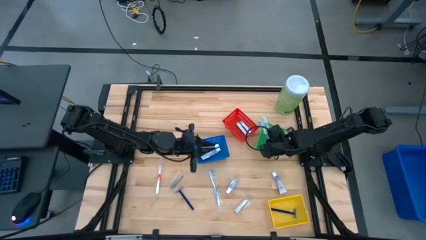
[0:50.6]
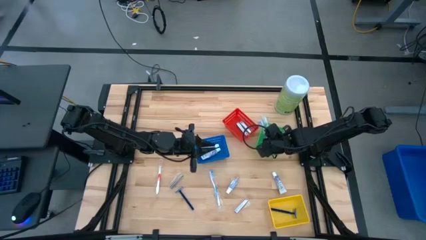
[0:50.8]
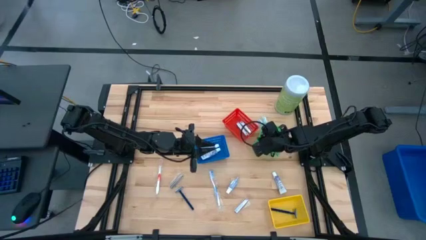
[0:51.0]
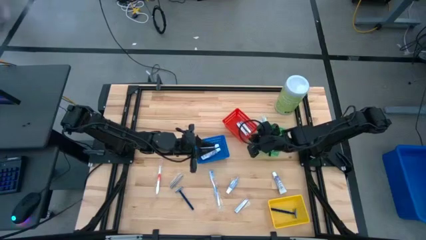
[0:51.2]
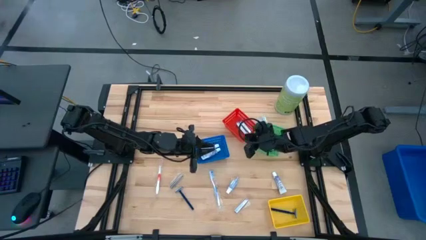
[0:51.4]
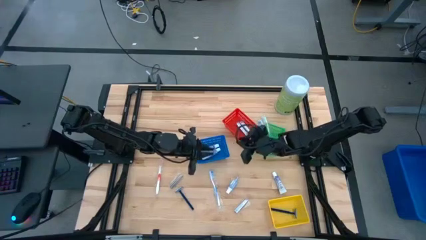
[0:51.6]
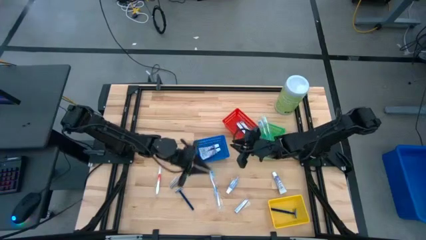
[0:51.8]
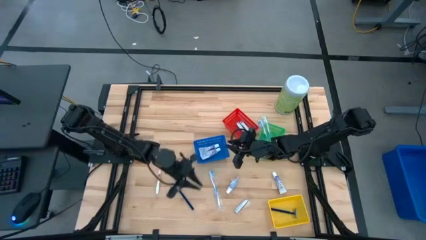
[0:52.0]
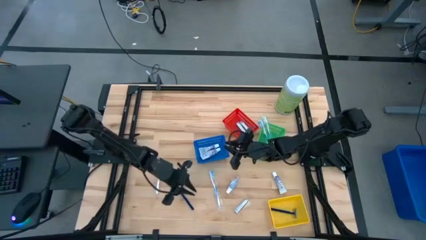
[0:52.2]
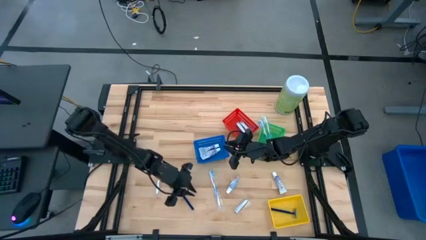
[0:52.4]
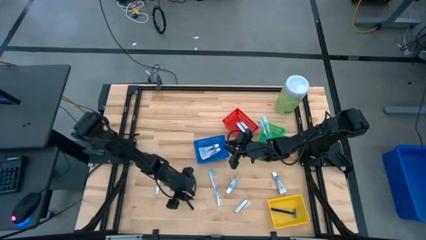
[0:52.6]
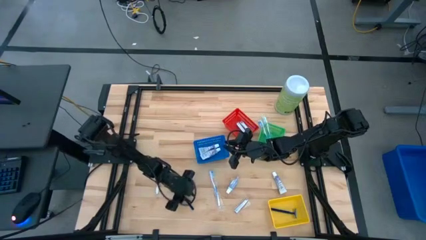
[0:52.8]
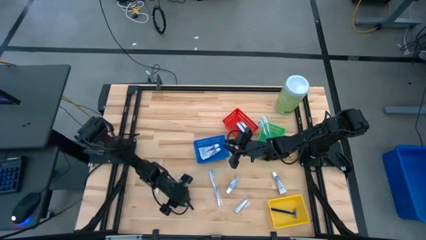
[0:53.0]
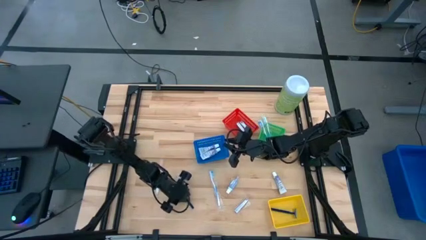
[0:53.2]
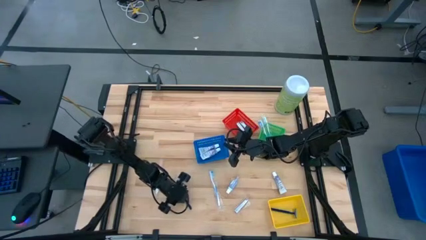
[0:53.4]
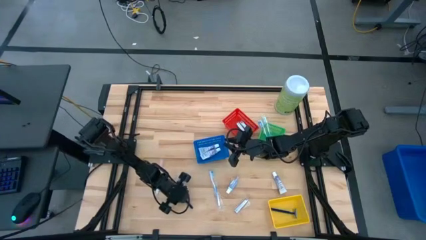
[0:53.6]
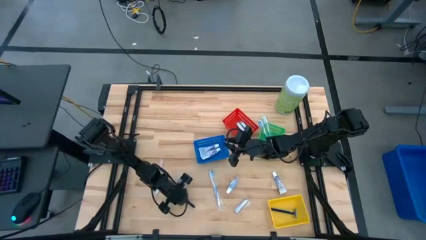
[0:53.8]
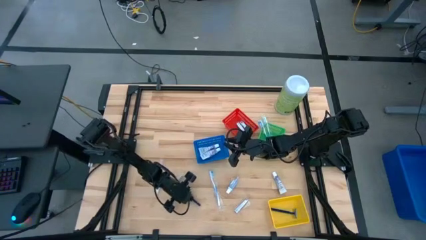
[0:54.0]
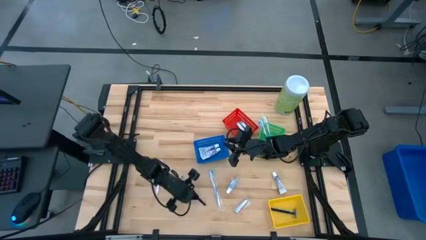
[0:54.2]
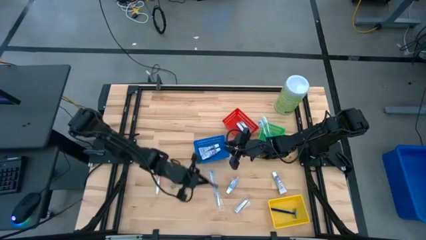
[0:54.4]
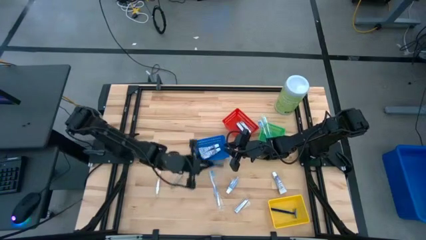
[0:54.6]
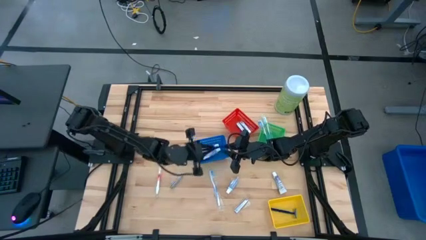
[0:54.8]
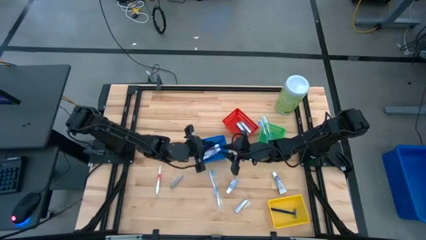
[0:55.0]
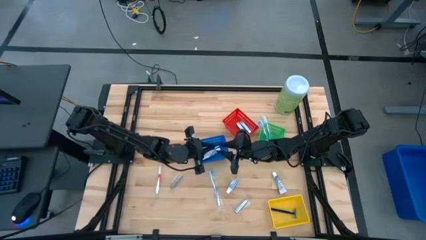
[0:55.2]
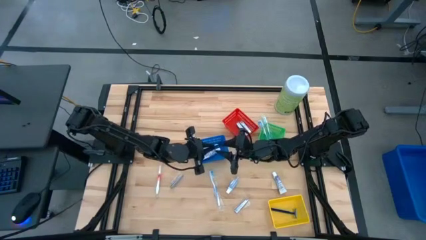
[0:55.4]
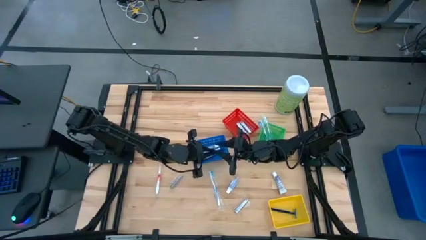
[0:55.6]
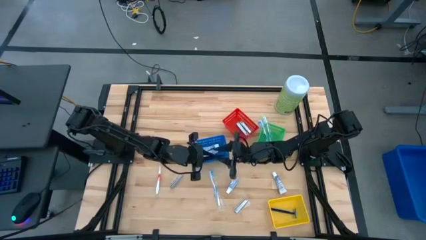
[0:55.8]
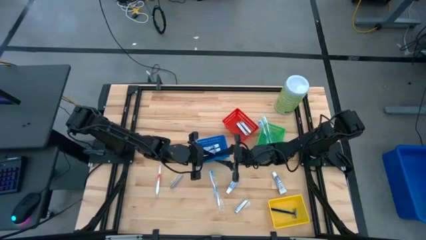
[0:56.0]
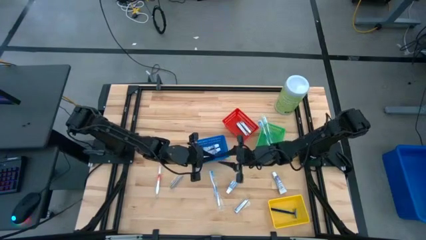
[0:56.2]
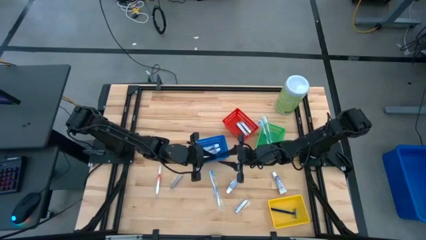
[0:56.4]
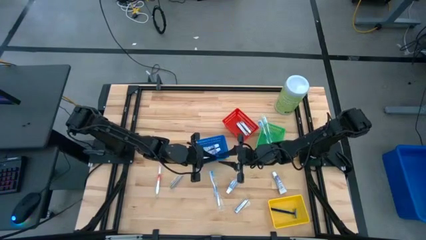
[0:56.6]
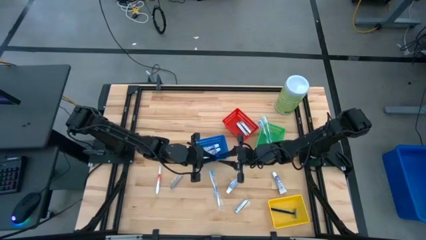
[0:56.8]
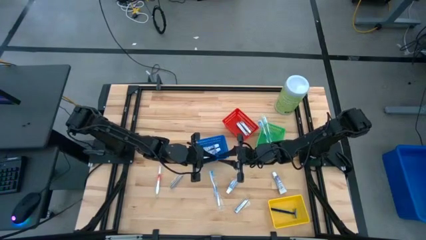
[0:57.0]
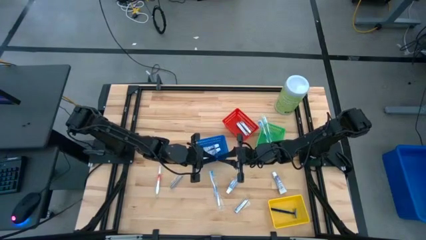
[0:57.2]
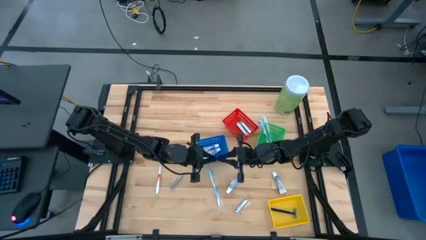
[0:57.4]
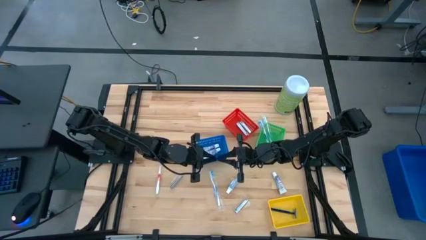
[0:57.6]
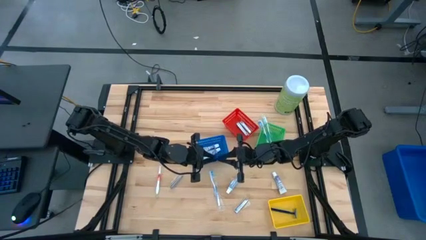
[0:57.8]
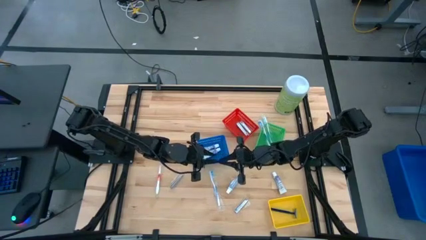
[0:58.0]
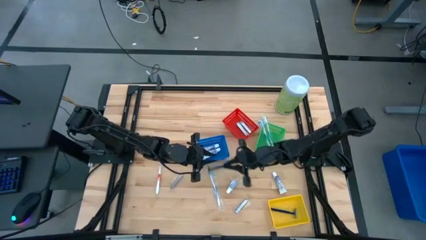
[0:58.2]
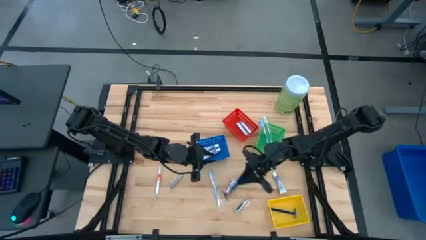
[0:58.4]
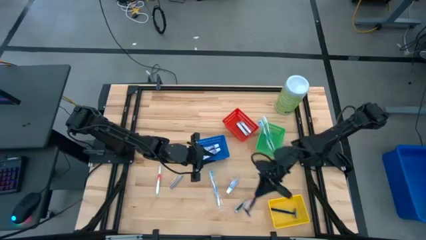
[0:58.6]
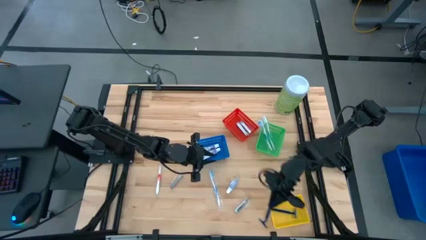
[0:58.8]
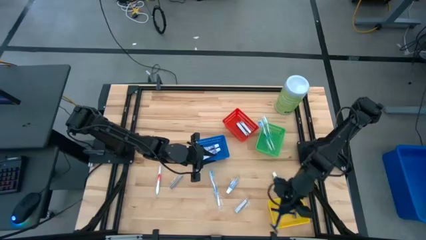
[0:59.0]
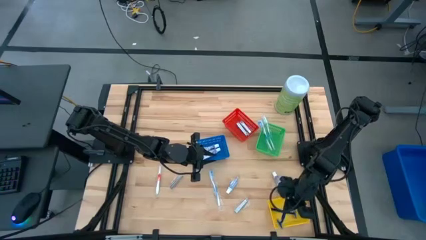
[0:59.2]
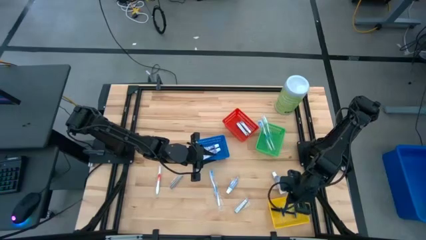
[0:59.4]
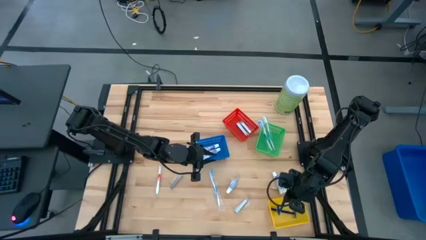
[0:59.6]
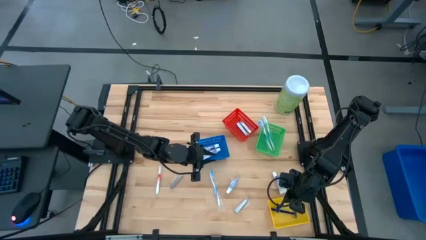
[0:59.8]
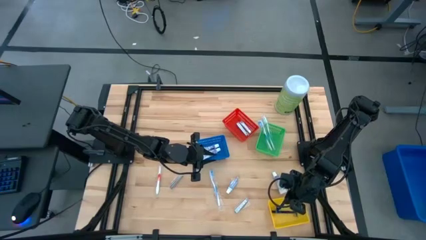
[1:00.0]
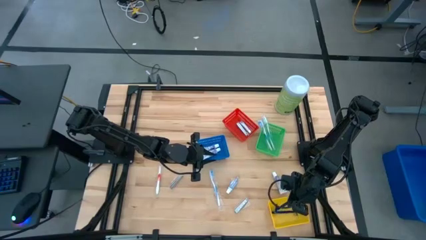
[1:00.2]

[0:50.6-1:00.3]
Task: Pick & Place Travel size toiletries
Put the blue razor into the yellow bin

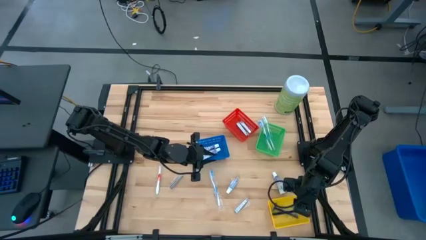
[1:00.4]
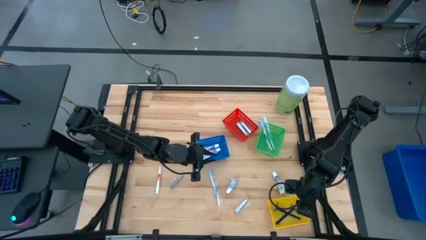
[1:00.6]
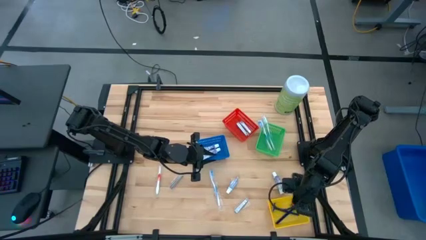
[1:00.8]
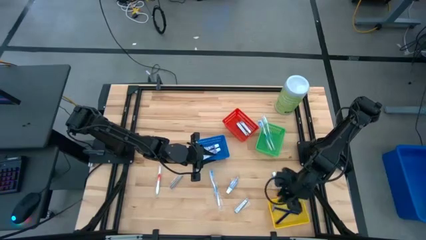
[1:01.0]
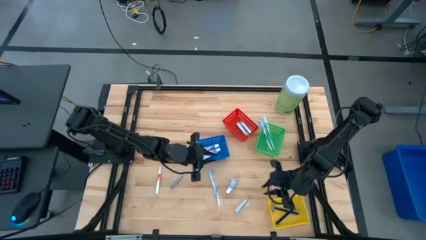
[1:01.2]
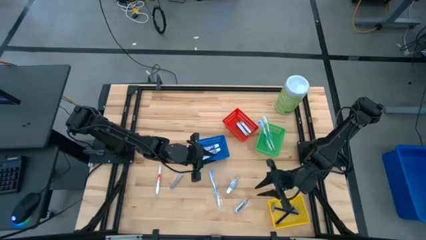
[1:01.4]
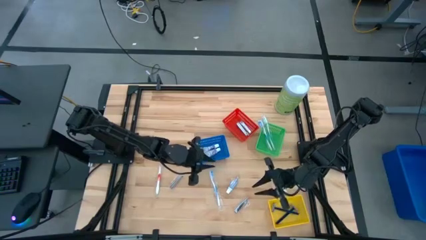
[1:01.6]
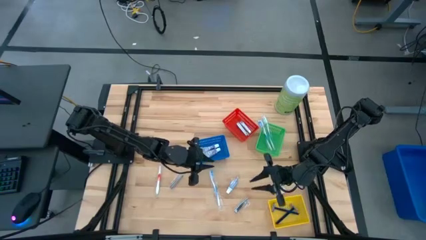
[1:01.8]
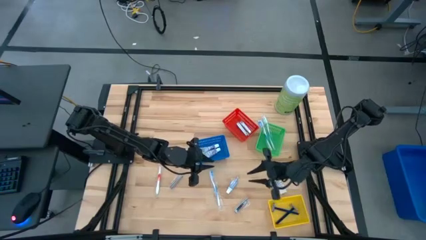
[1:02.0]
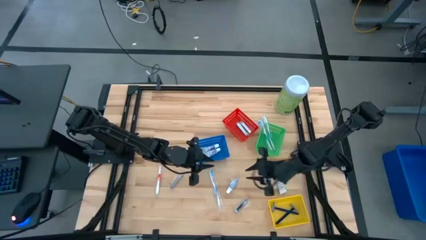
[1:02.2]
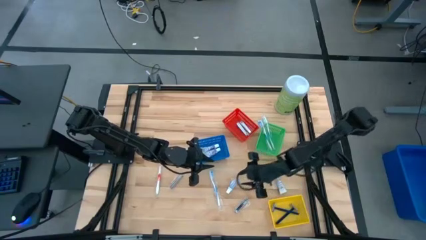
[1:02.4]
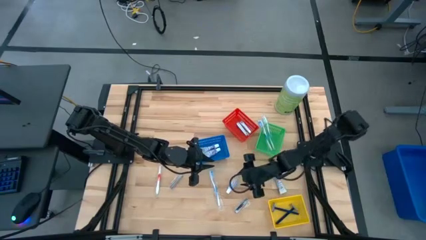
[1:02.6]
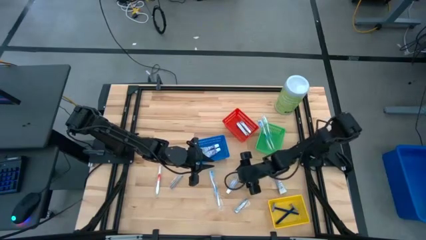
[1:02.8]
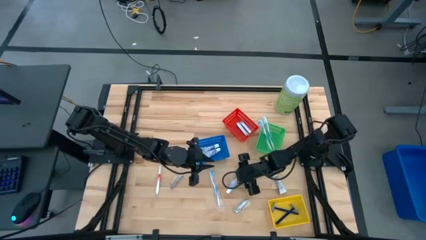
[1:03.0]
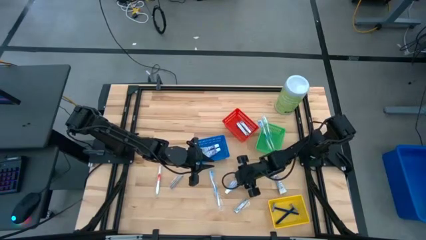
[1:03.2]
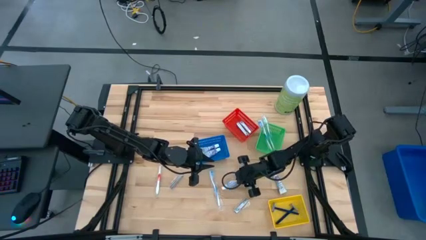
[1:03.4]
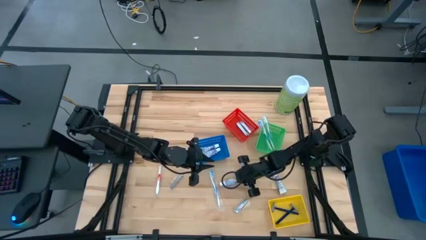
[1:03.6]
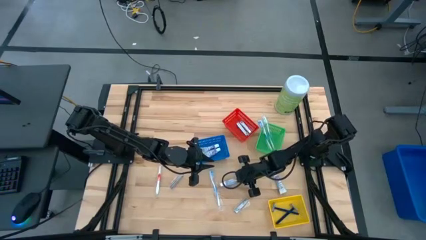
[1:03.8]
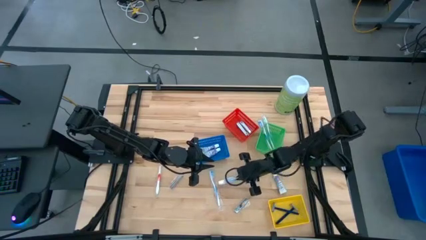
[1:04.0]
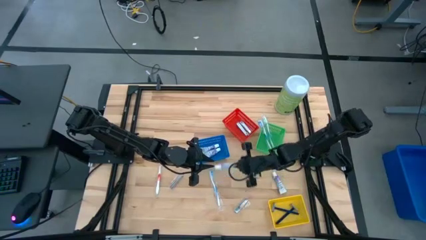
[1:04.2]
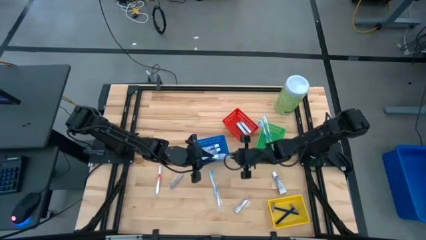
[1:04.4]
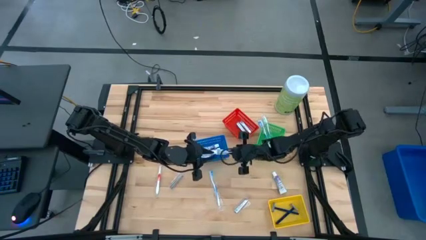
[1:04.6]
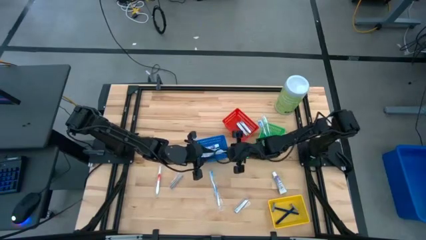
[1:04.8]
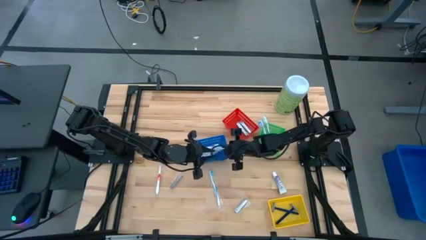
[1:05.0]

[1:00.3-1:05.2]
Put the white toothpaste into the blue bin

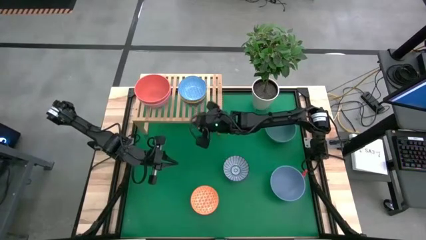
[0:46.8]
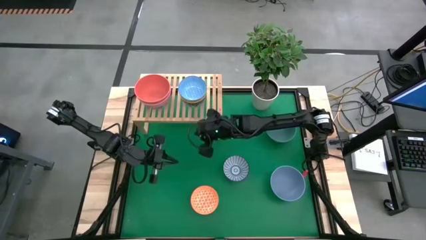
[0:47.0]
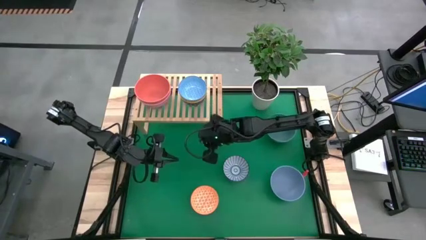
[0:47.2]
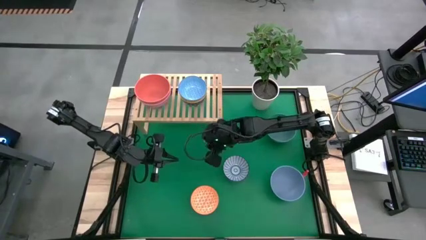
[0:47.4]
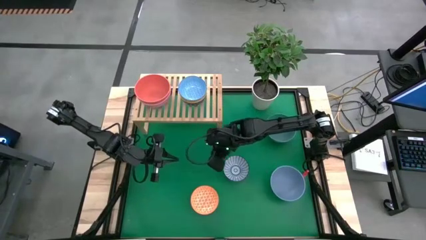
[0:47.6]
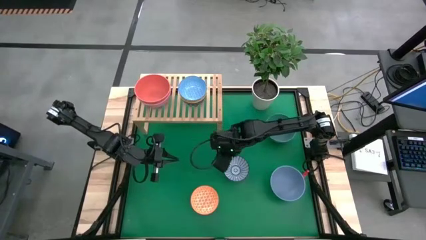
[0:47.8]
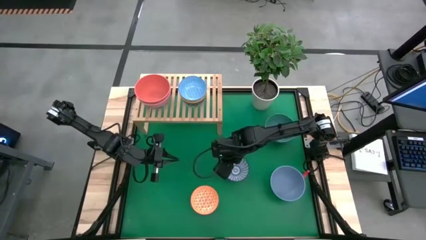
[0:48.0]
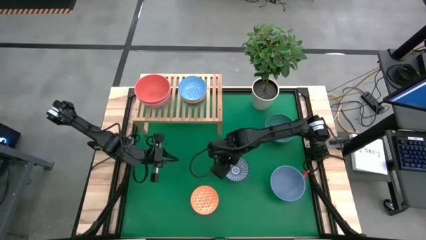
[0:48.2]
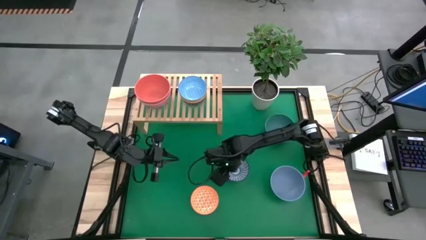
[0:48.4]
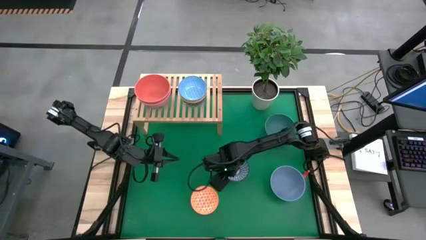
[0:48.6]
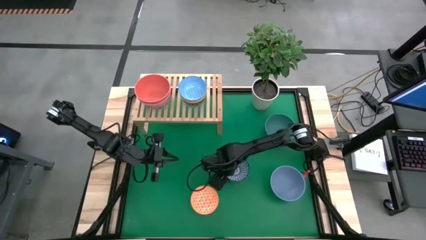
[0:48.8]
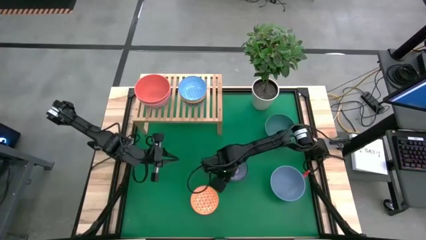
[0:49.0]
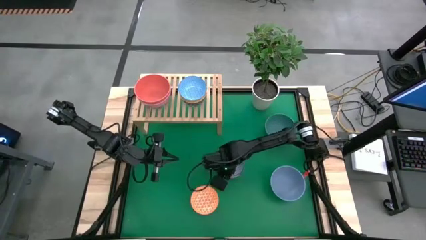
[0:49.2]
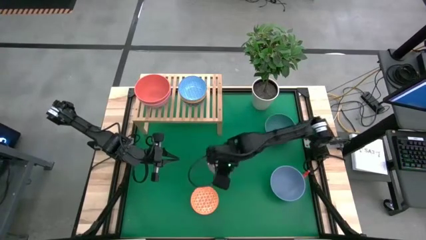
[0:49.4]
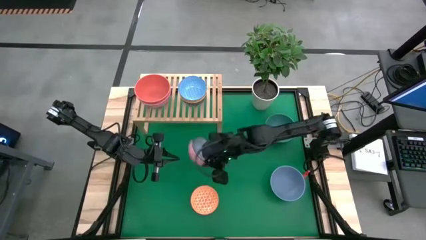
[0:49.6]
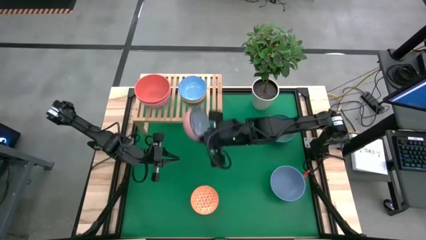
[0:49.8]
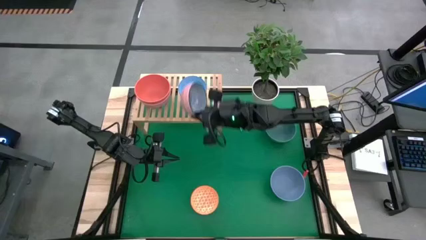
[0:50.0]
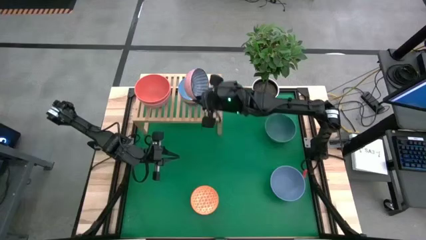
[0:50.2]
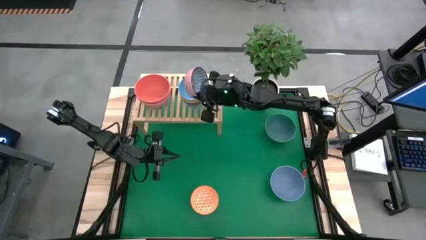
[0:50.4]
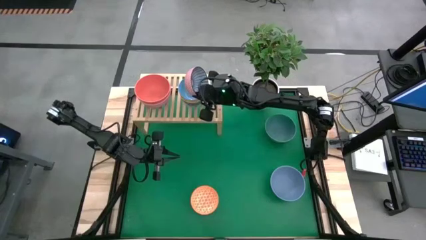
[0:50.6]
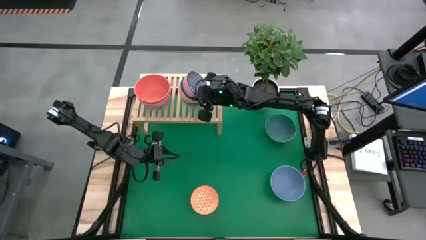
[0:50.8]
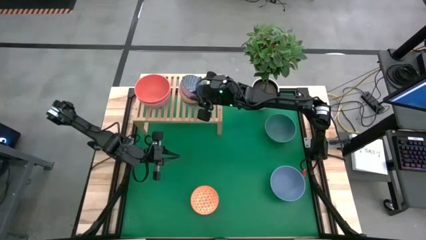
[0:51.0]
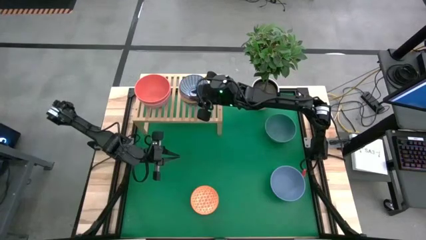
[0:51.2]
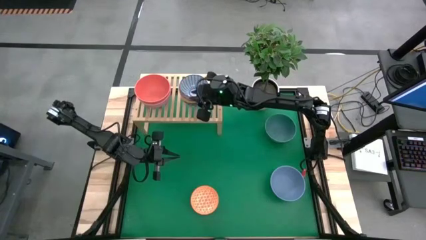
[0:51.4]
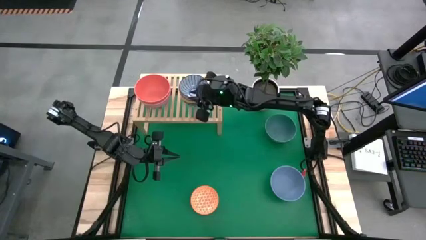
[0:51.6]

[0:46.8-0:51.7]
Task: Place and stack bowls onto a shelf
Stack the blue patterned bowl on top of the light blue patterned bowl on the shelf
